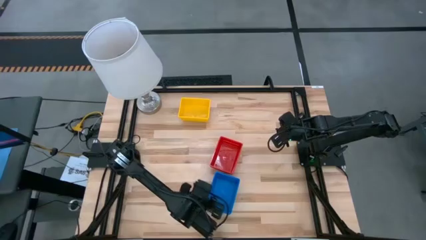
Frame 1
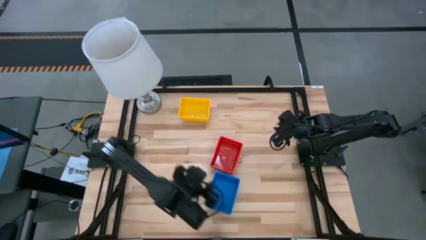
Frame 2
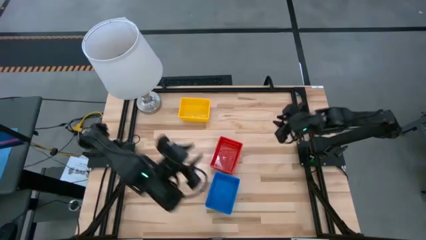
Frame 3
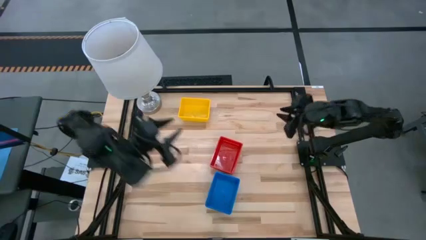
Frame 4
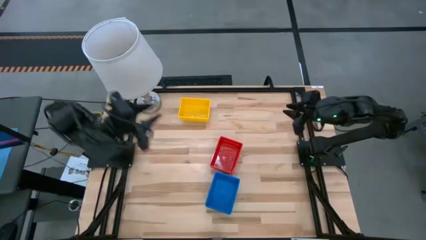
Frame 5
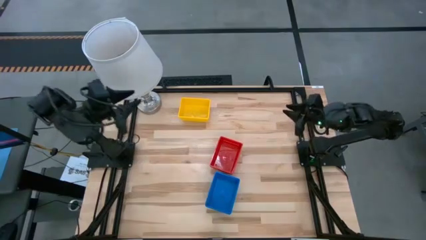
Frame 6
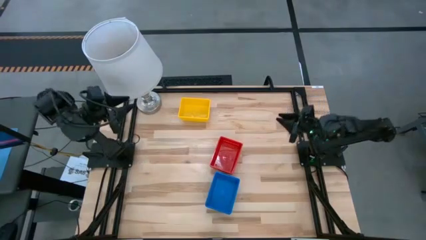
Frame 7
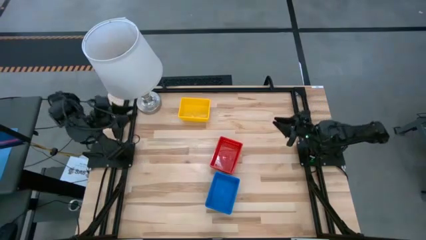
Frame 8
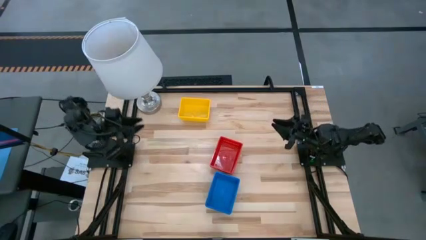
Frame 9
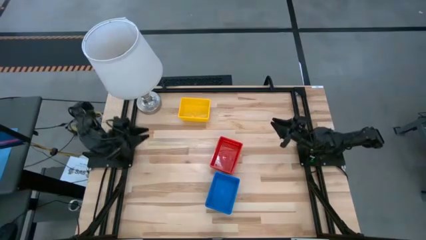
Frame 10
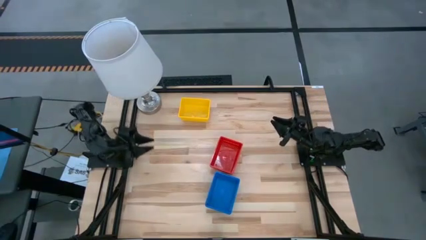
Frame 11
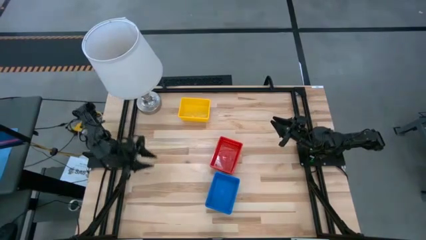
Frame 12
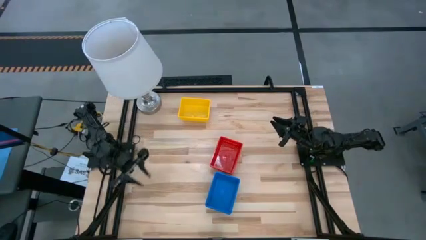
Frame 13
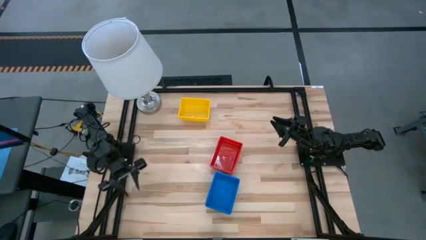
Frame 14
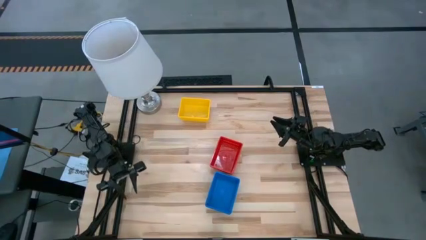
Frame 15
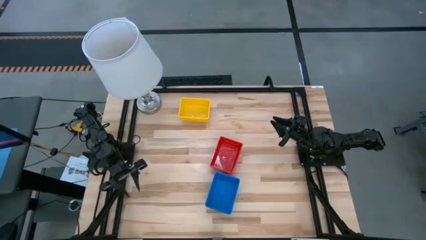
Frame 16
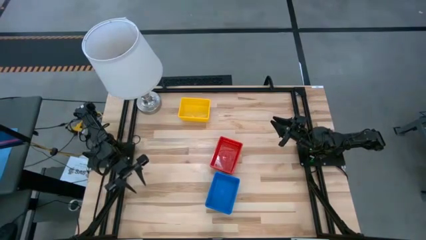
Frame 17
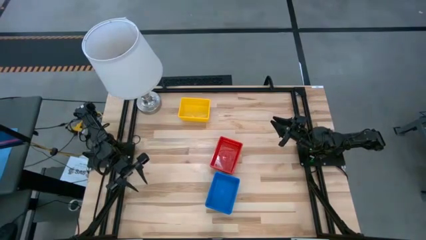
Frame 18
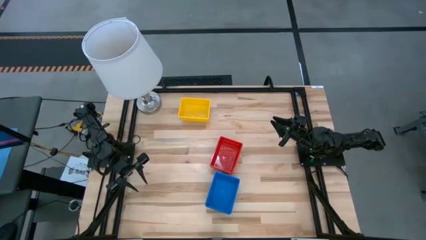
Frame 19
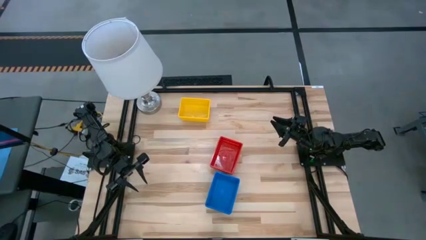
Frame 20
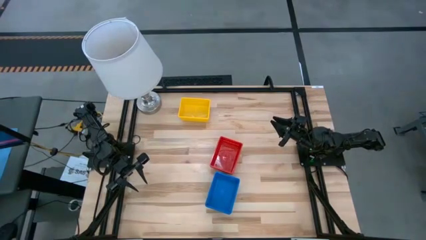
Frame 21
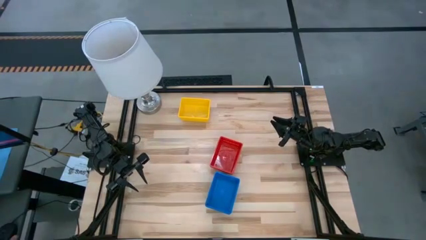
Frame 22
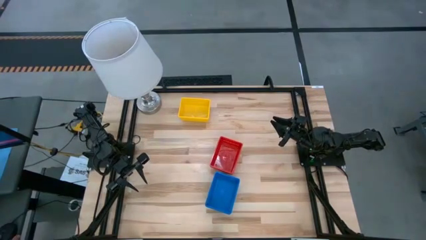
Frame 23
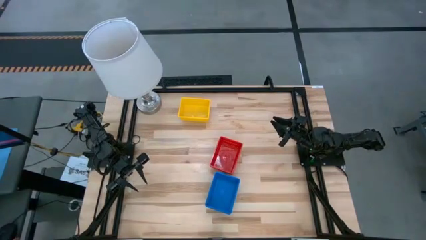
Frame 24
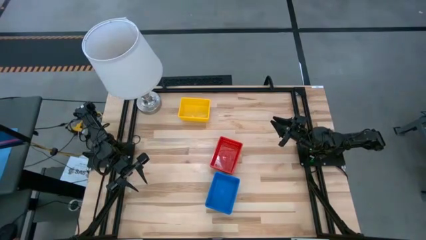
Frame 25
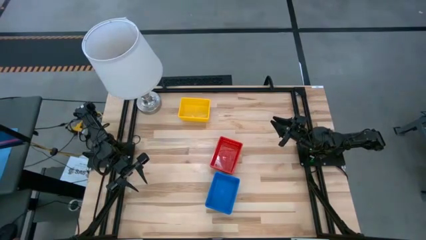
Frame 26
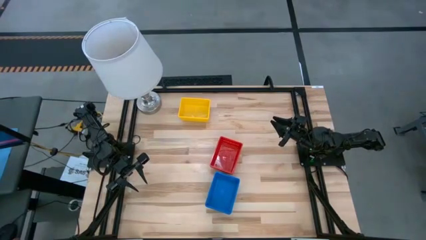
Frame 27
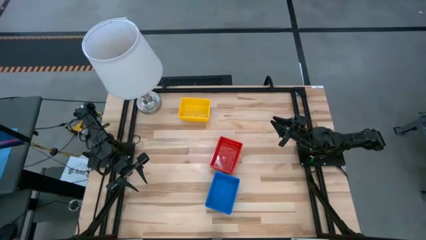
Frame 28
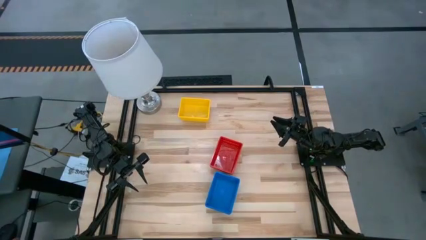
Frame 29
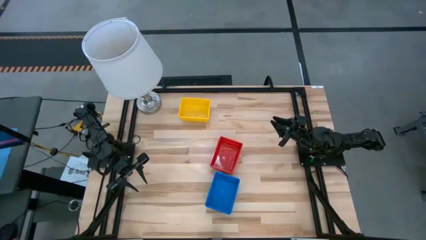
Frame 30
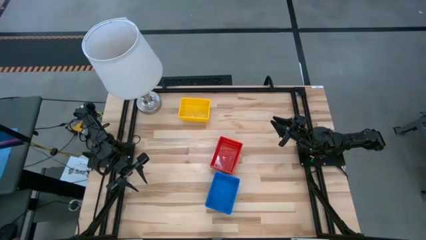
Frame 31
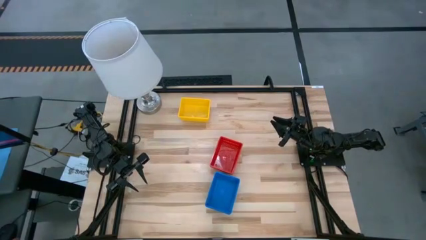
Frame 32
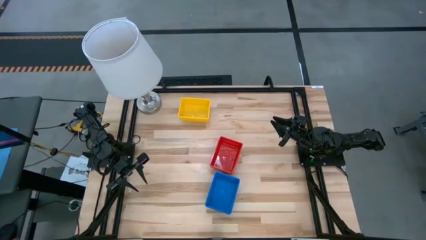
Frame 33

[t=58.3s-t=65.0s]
Return to Home Position

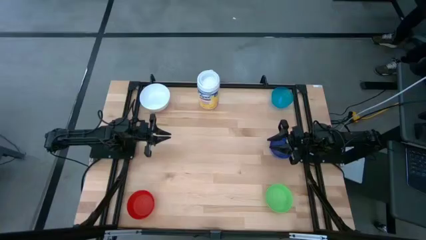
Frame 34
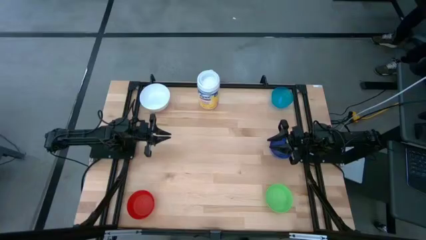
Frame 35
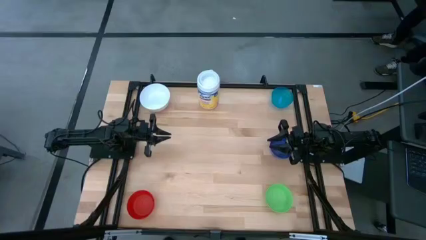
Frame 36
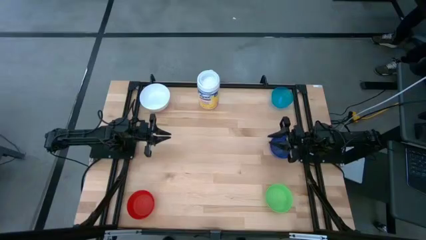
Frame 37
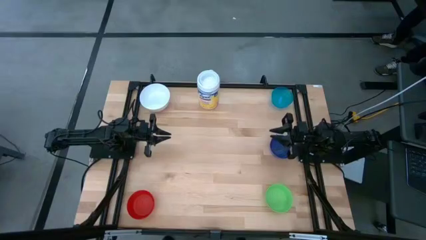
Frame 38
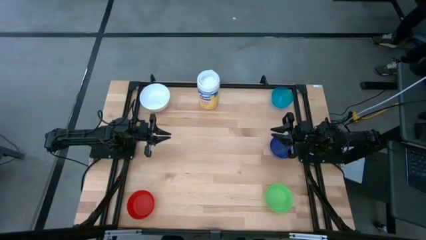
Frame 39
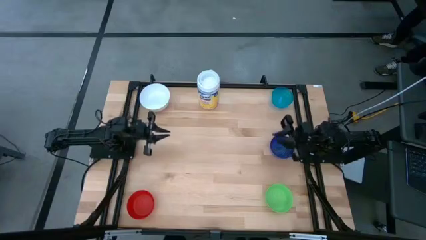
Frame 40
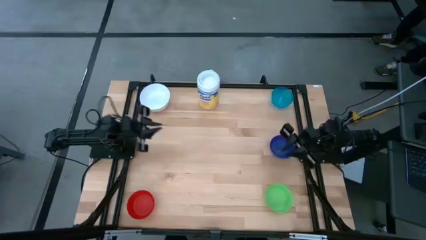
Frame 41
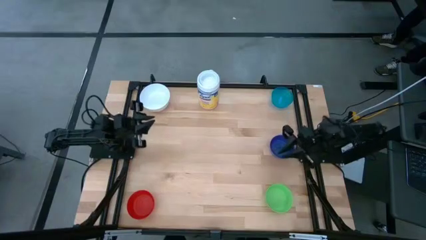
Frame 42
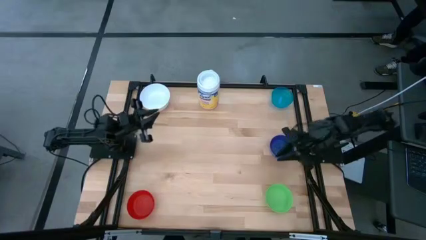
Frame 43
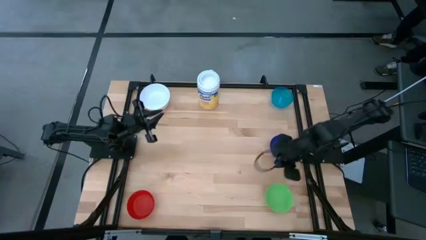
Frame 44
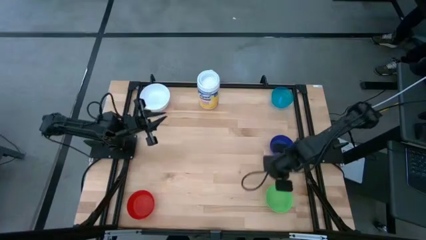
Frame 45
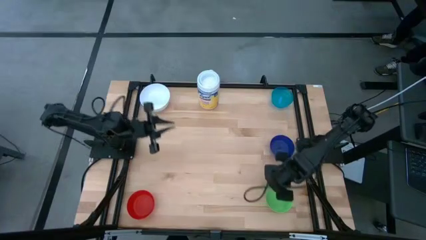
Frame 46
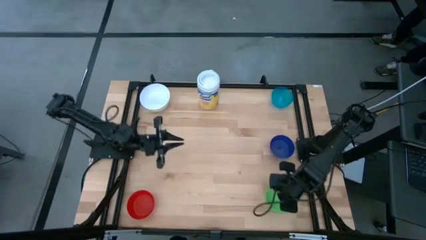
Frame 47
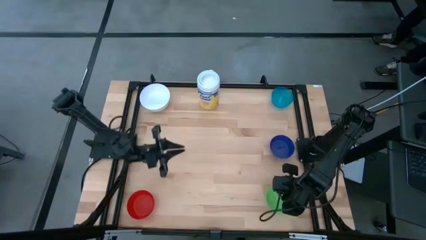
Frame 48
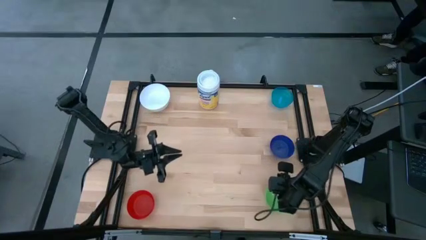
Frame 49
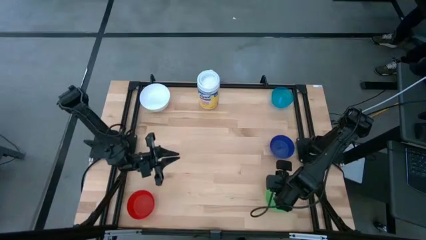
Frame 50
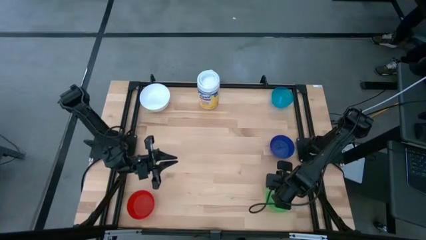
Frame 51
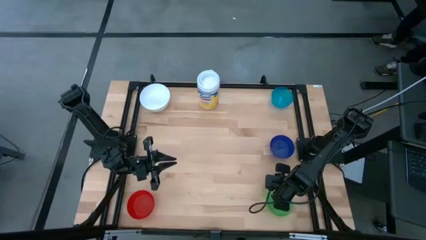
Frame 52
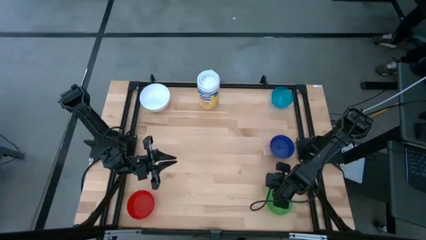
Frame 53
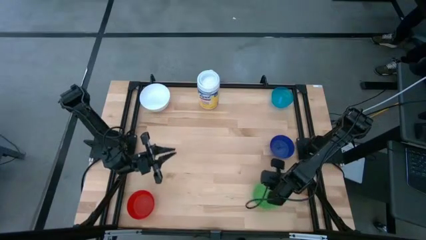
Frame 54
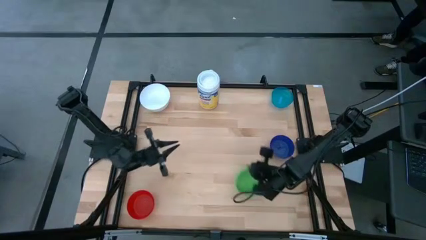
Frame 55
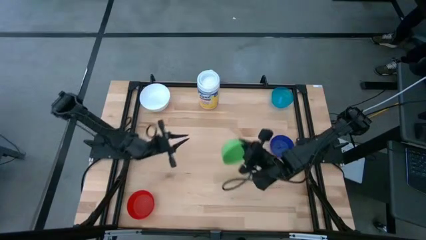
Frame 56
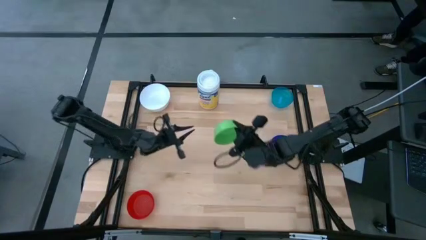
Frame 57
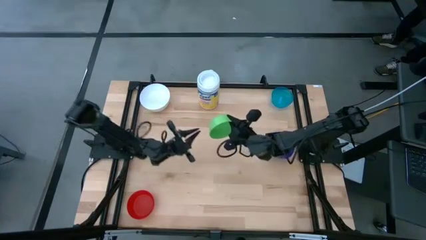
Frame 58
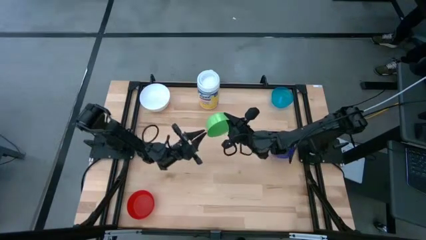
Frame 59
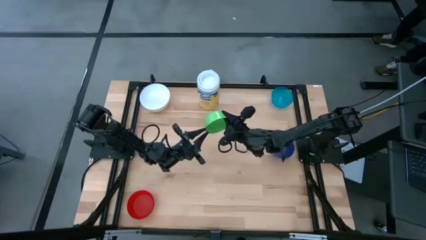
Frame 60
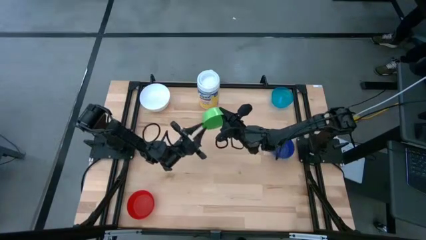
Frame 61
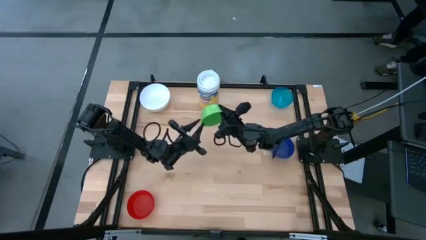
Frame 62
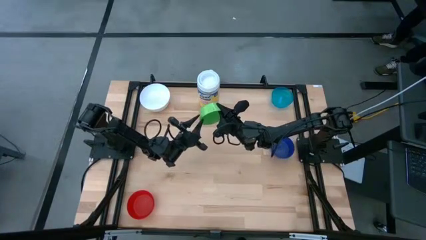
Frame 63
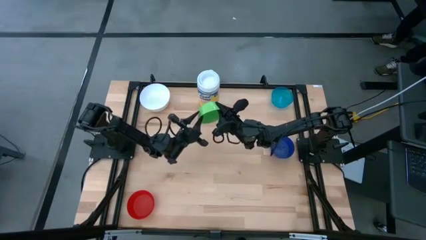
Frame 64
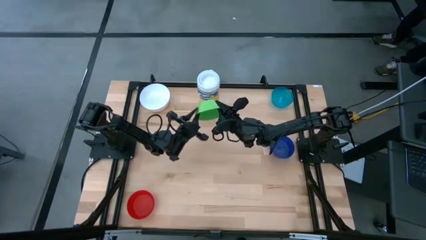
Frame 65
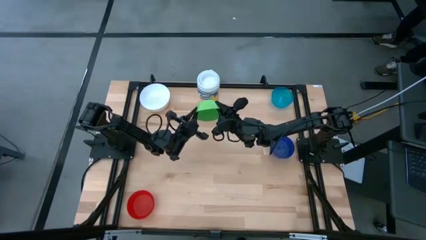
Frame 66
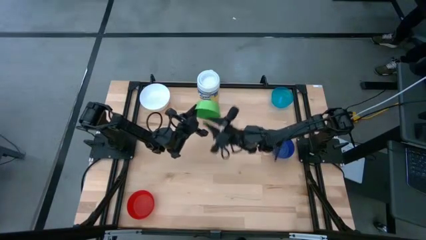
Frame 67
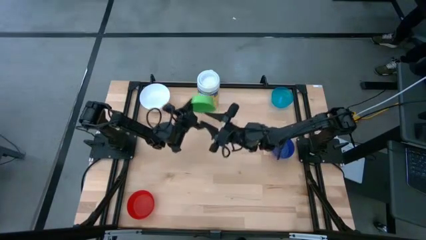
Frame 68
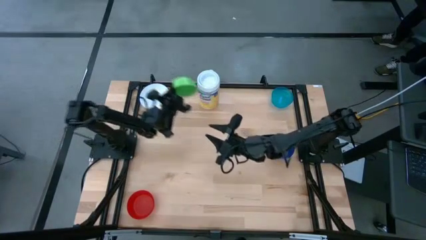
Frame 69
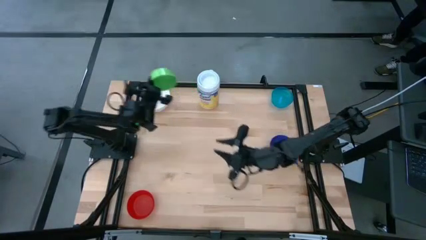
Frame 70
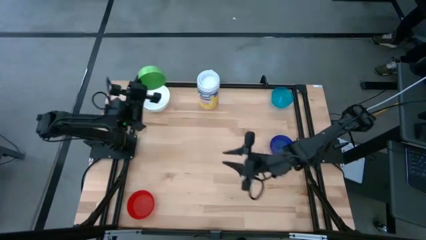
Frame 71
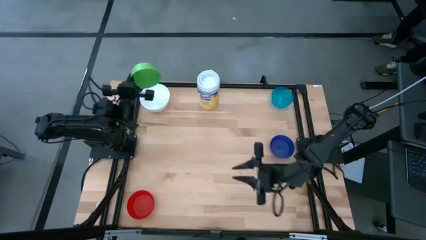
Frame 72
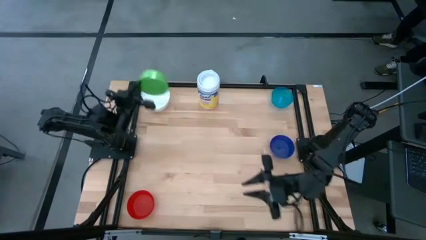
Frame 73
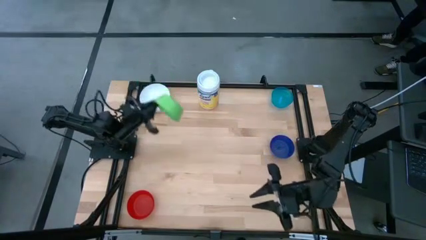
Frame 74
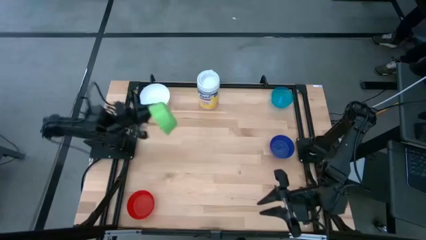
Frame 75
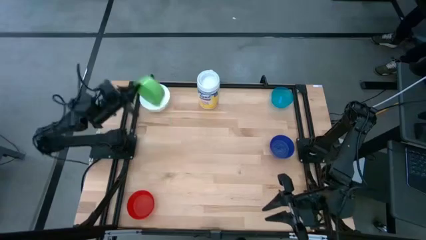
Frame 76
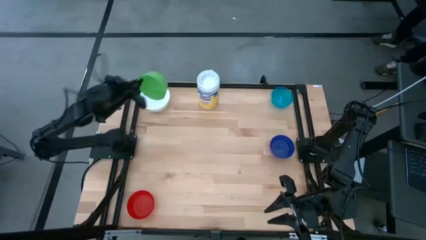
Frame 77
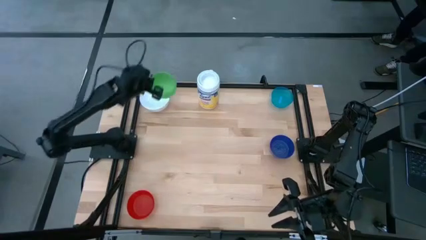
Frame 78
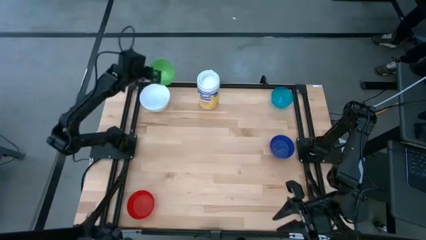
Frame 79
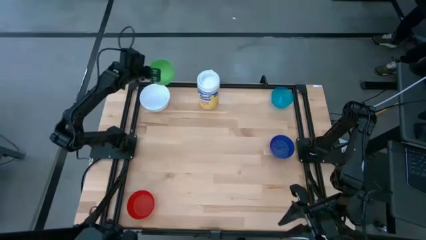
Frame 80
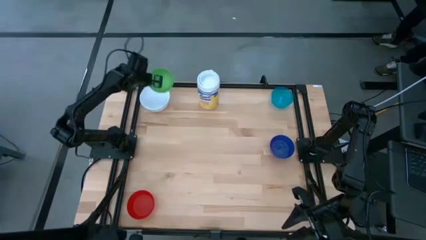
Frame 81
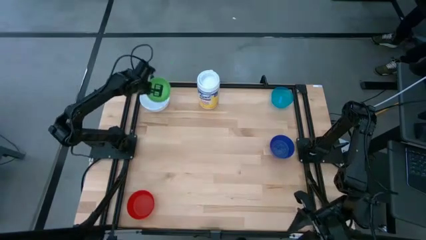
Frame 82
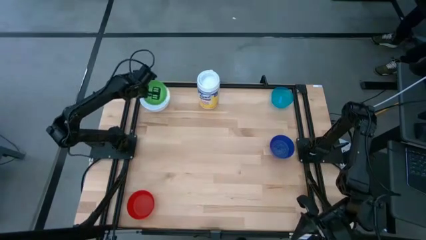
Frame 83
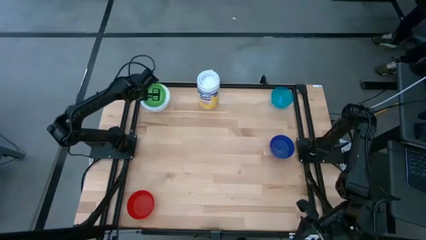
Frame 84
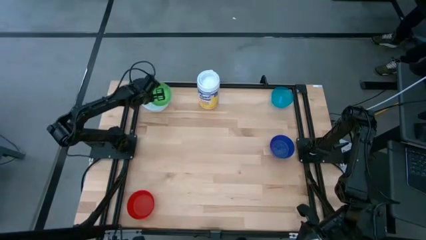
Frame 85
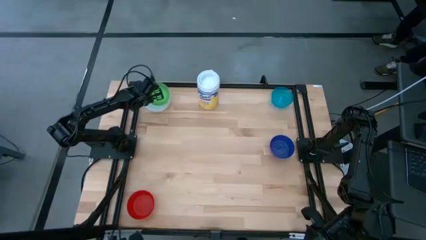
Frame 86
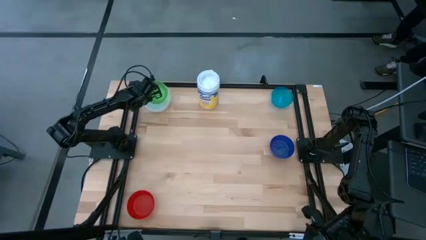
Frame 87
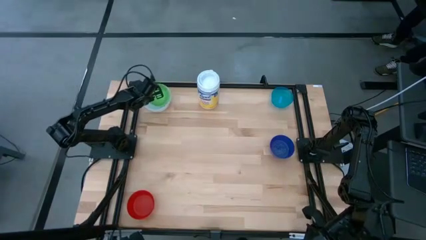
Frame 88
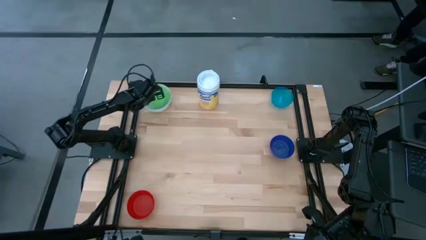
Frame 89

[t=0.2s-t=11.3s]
Stack the green bowl on the white bowl
